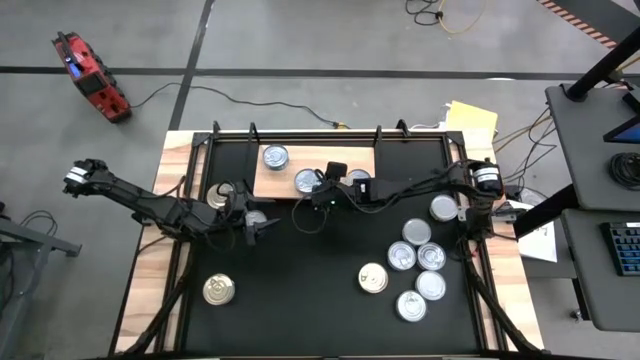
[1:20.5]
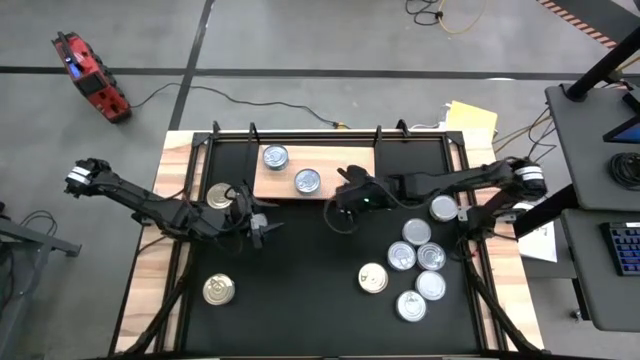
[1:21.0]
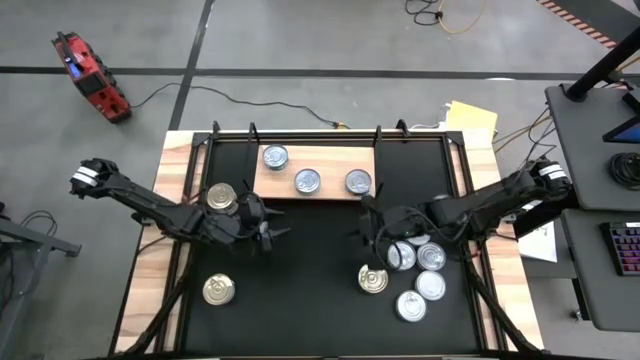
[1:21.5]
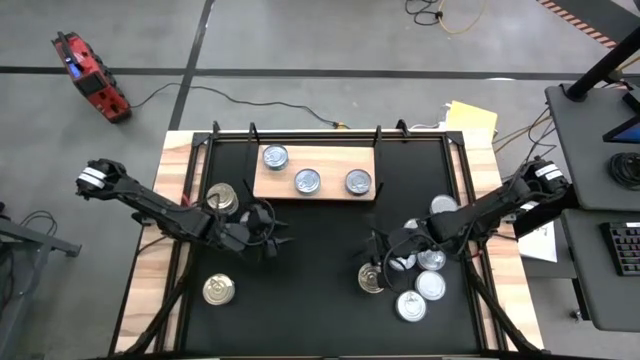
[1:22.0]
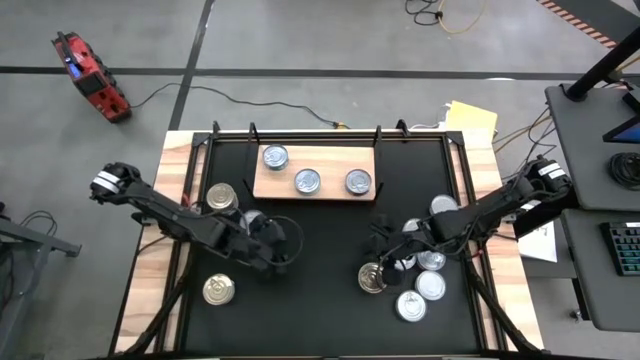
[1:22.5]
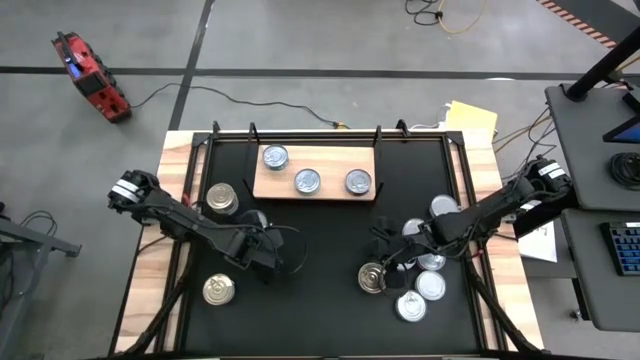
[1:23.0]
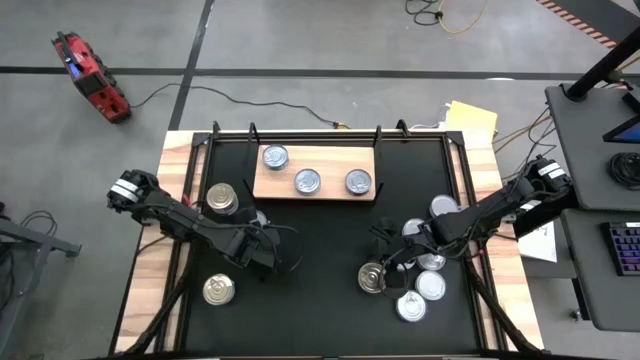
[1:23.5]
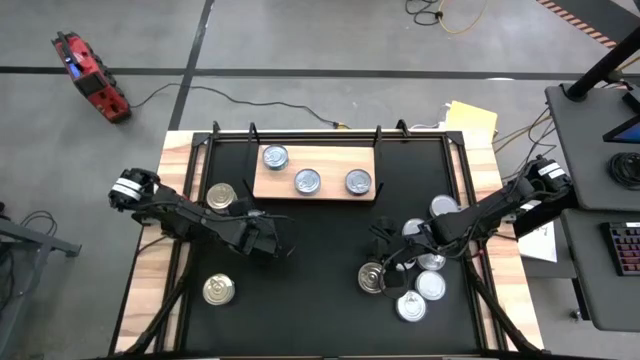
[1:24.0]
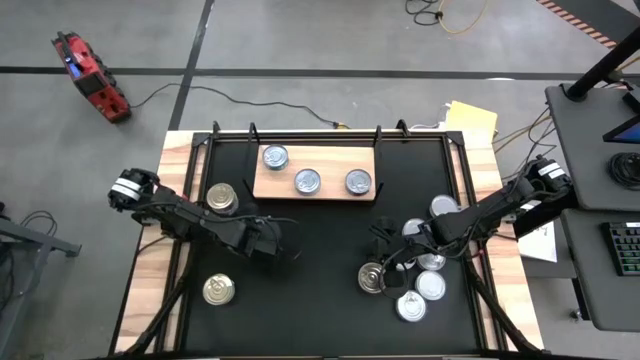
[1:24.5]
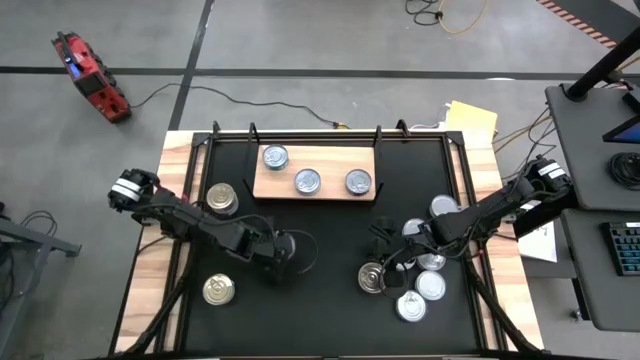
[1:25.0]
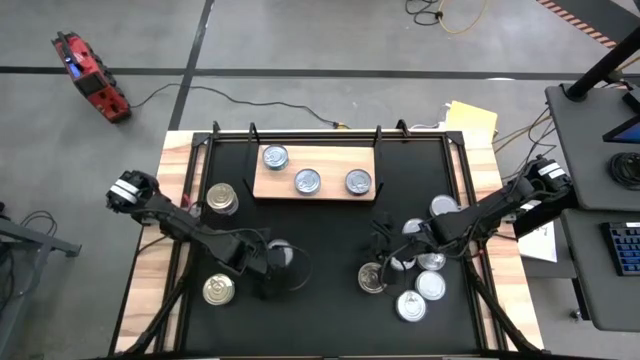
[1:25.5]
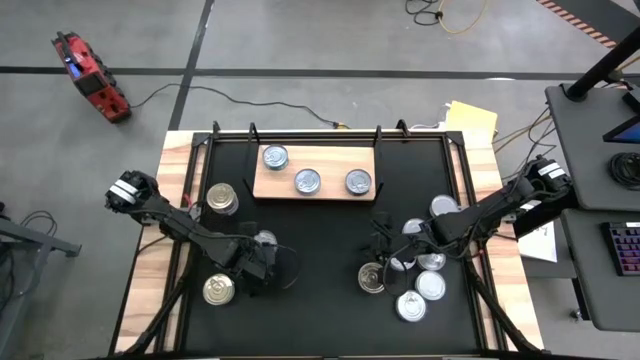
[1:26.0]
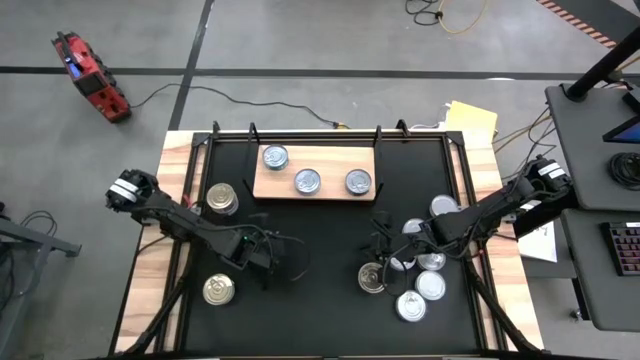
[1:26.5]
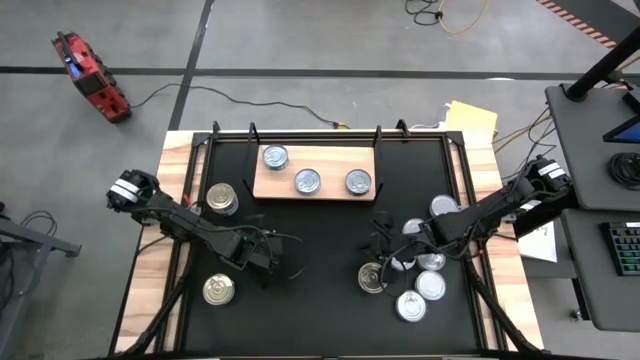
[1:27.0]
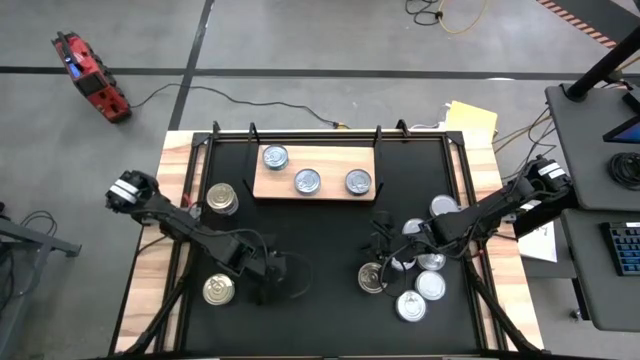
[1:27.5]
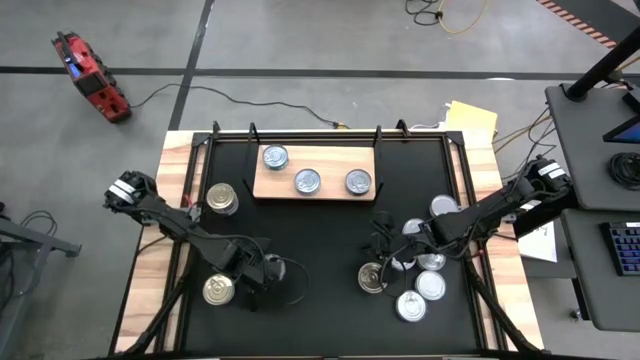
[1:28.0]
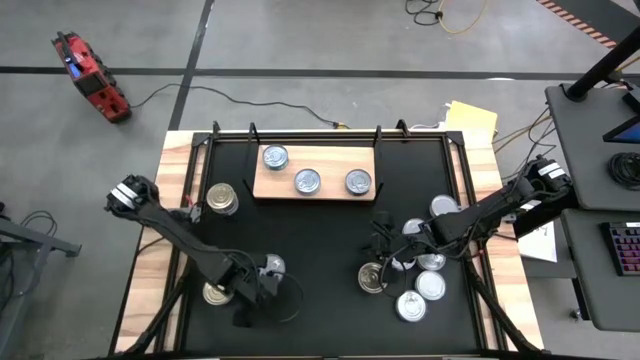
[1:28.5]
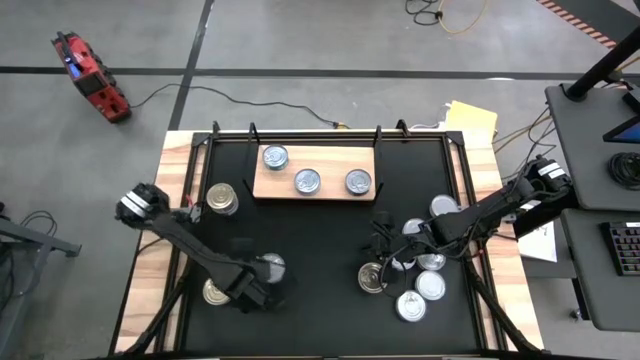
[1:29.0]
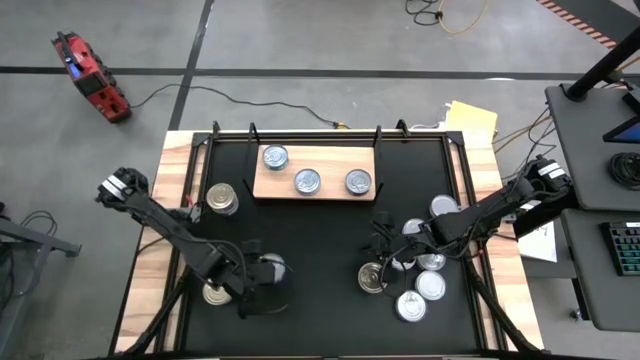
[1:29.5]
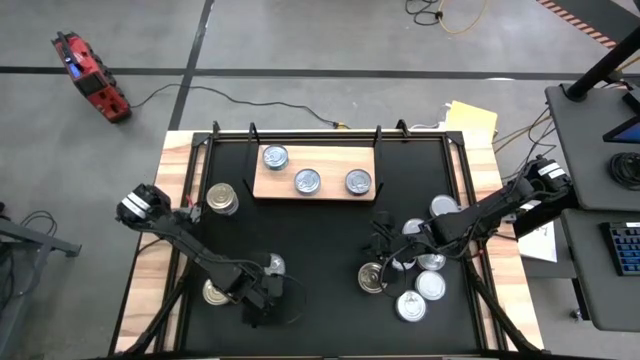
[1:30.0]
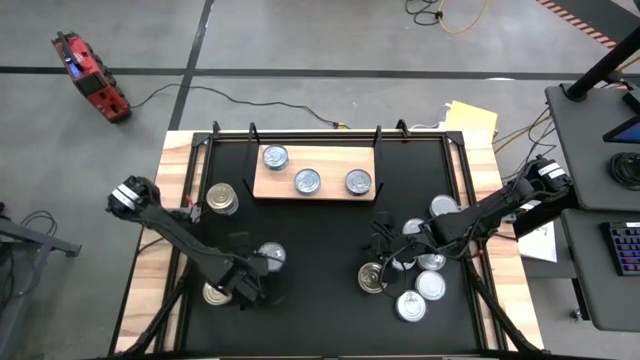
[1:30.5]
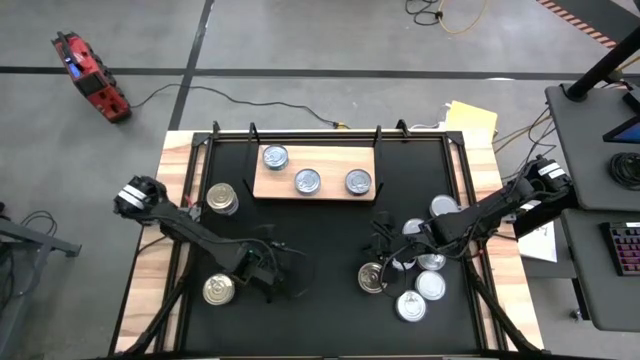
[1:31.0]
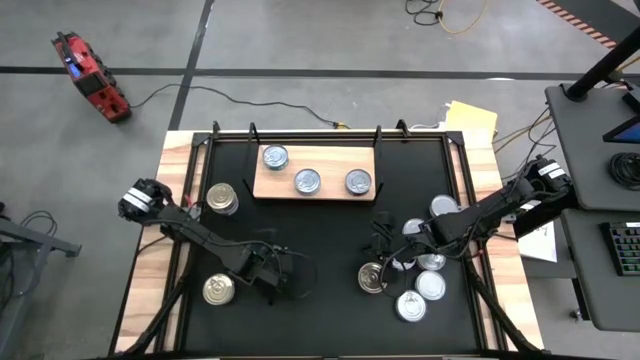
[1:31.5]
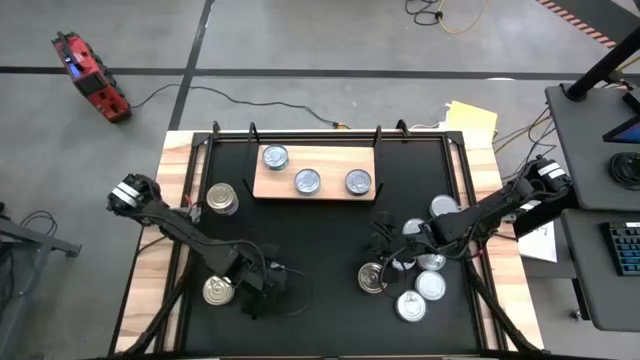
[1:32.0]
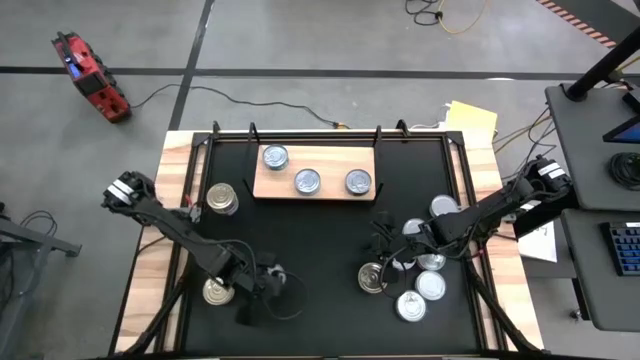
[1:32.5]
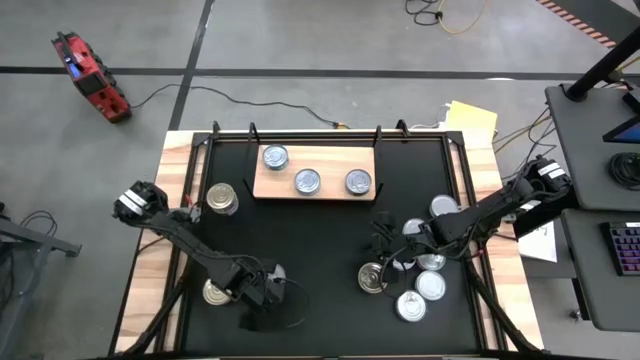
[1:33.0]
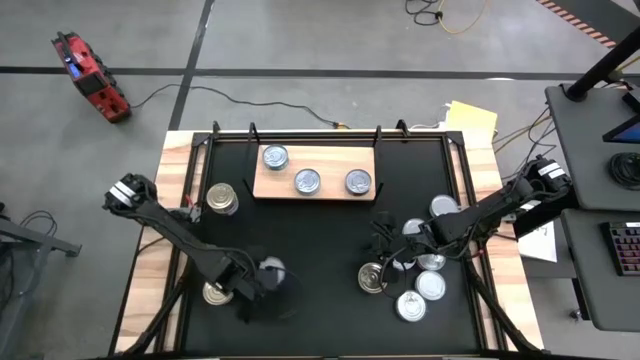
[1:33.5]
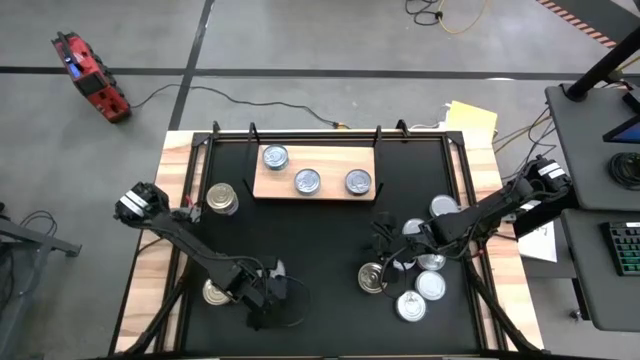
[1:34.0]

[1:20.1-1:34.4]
Task: Stack canned seafood by type on shelf
Stack the blue tuna can on top of the other blue tuna can on the shelf

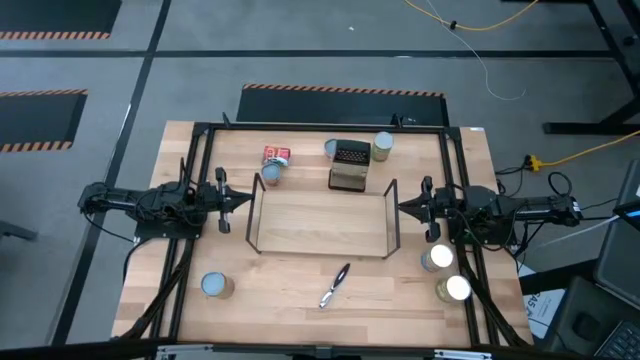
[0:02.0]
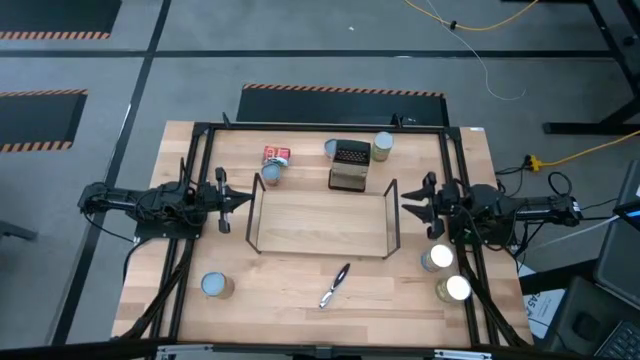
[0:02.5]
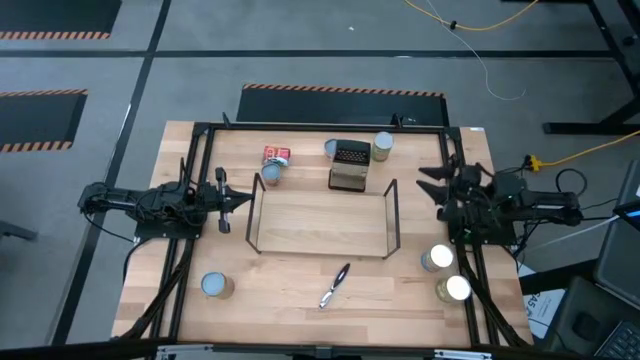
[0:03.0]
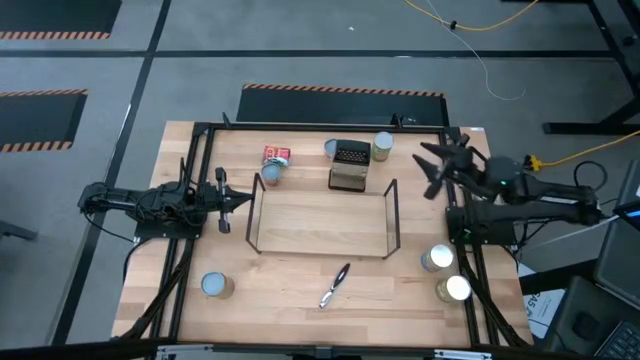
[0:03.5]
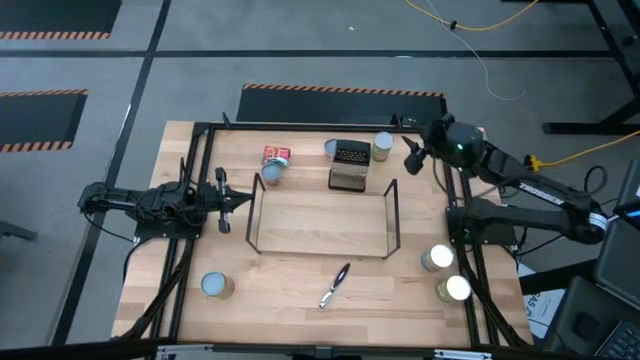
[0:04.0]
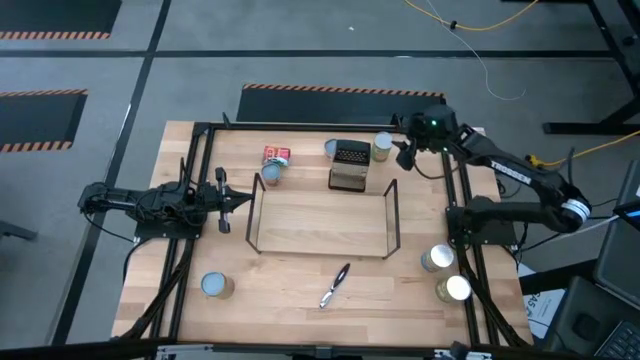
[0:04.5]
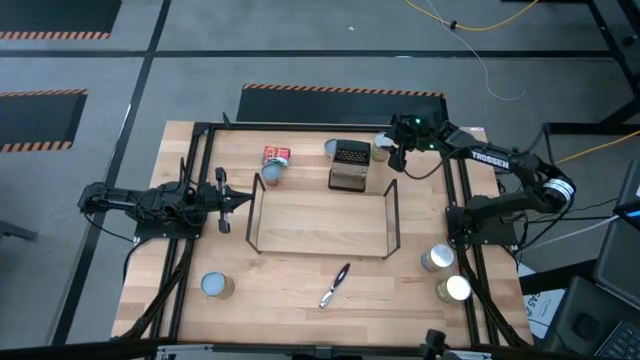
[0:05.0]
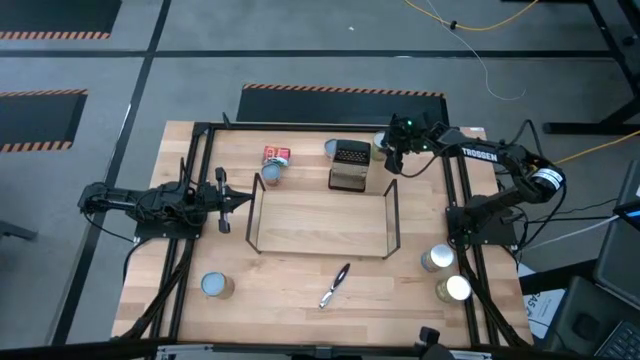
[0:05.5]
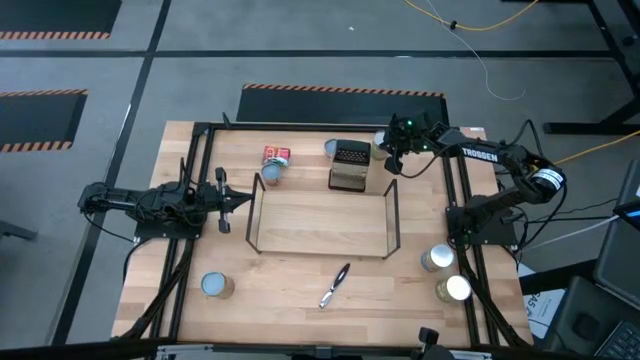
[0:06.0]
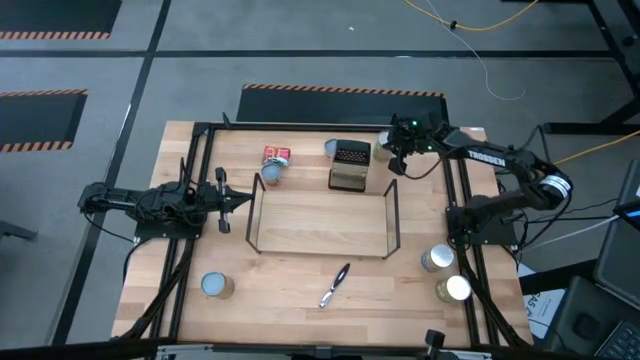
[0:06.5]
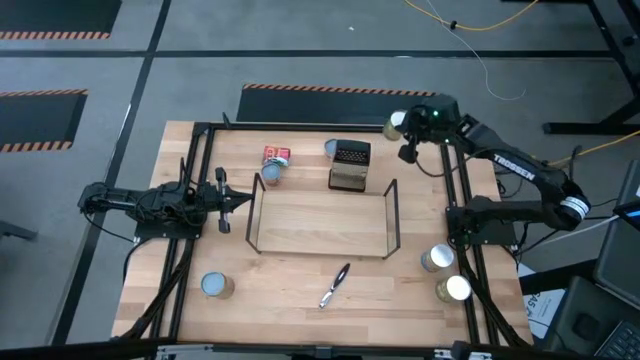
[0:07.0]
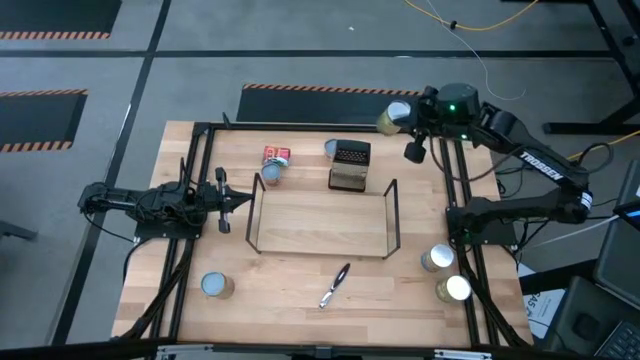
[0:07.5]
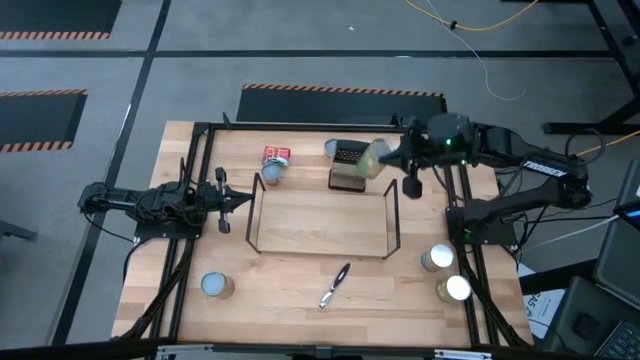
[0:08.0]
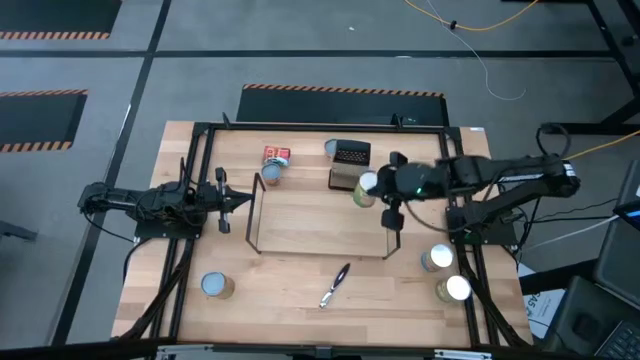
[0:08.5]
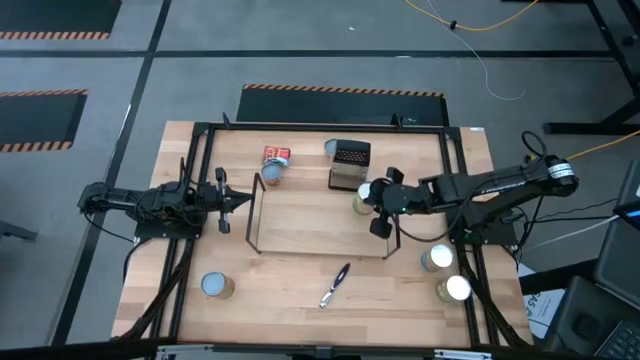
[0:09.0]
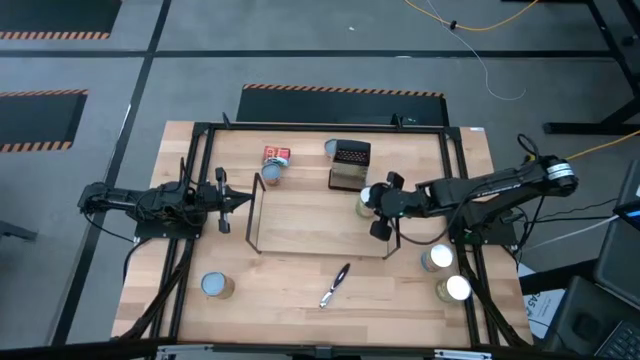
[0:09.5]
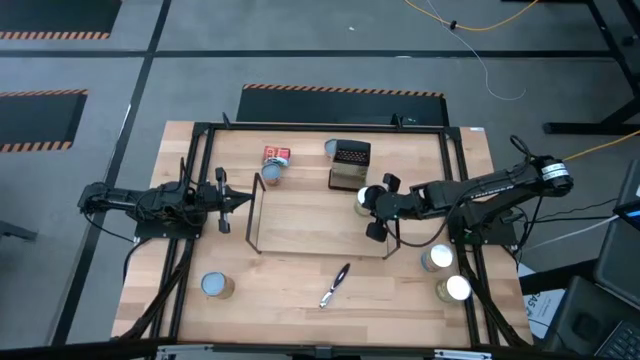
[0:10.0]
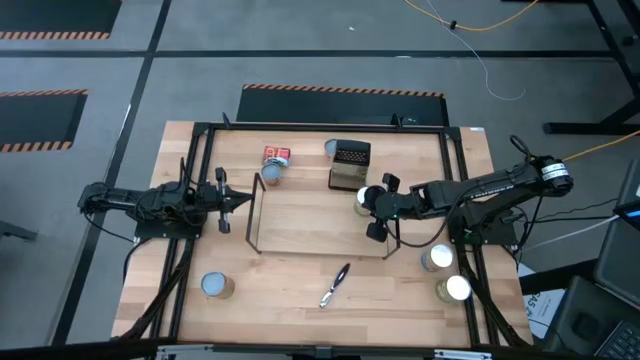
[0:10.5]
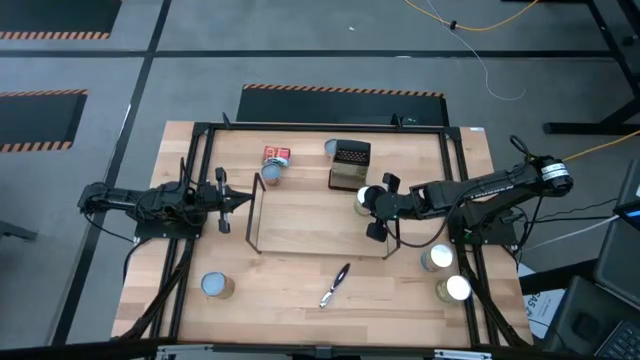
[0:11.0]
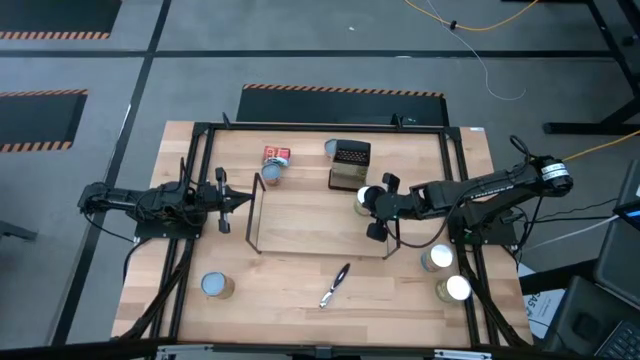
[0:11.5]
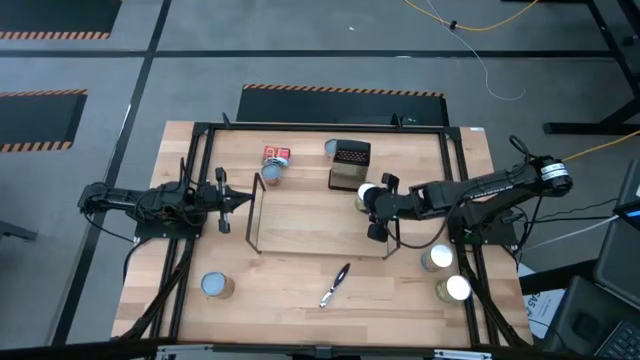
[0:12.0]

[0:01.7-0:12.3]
Task: Pick and place cans onto a shelf
Put the canned oranges on the shelf
